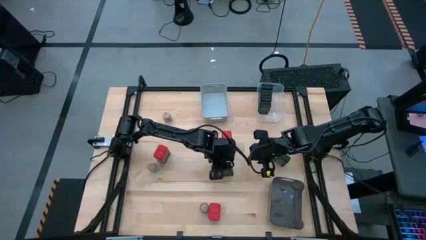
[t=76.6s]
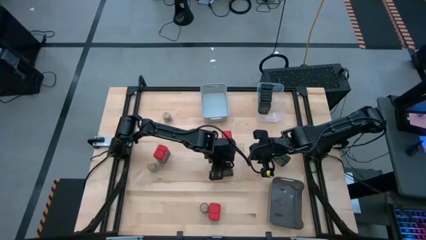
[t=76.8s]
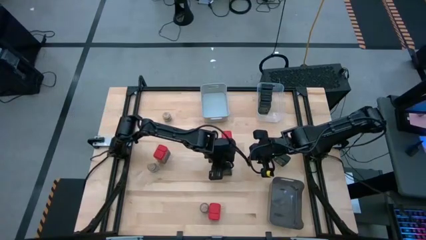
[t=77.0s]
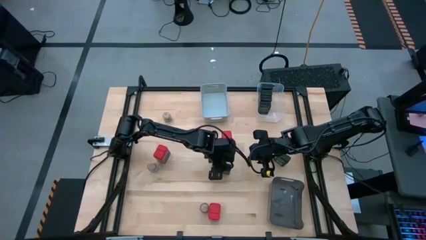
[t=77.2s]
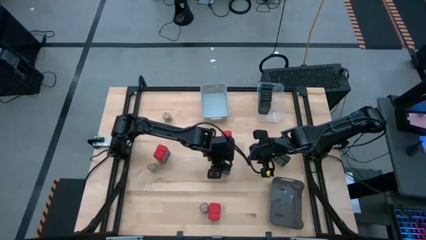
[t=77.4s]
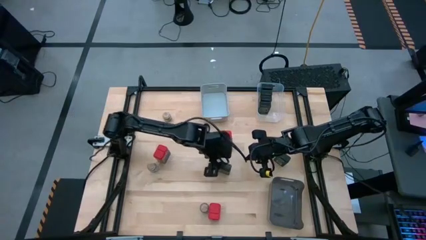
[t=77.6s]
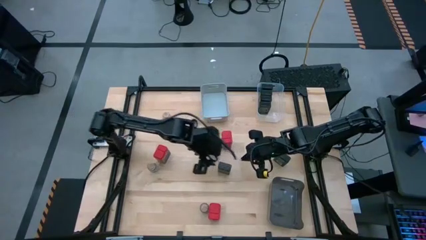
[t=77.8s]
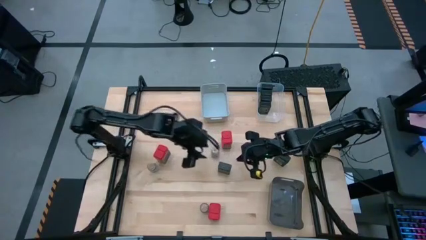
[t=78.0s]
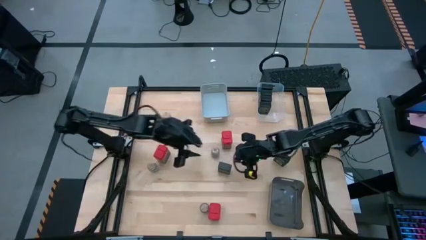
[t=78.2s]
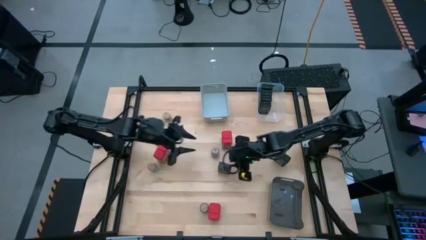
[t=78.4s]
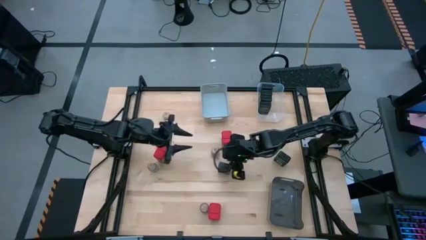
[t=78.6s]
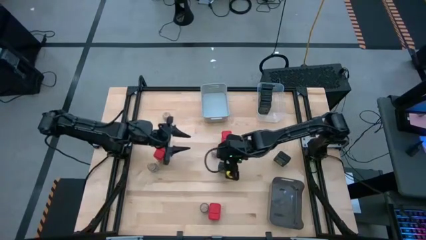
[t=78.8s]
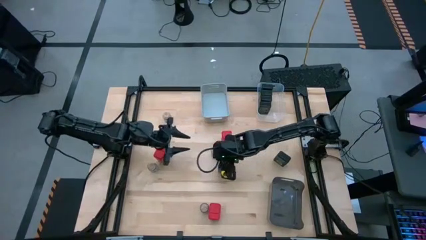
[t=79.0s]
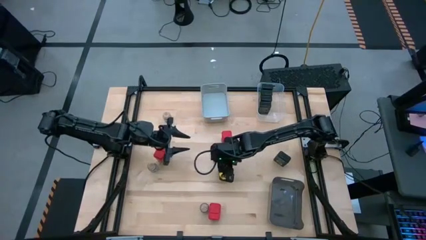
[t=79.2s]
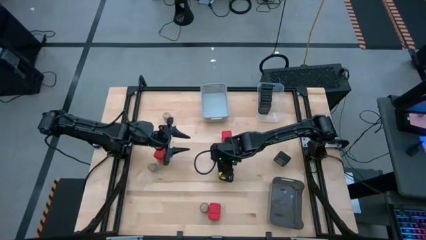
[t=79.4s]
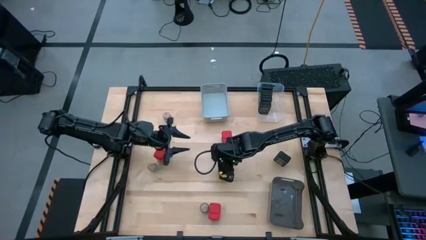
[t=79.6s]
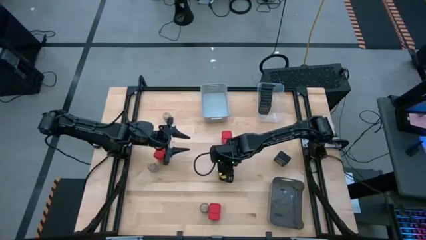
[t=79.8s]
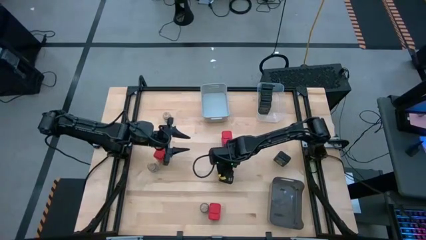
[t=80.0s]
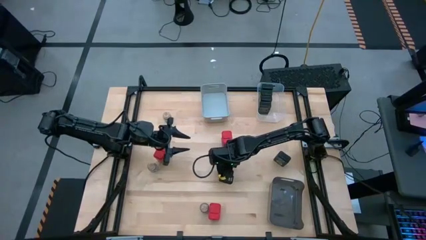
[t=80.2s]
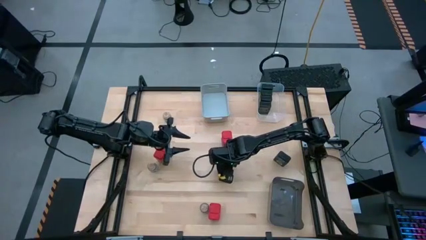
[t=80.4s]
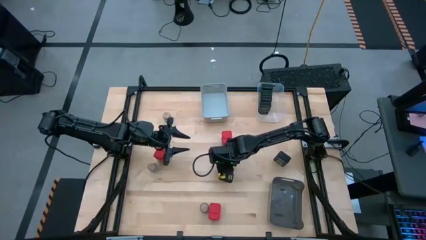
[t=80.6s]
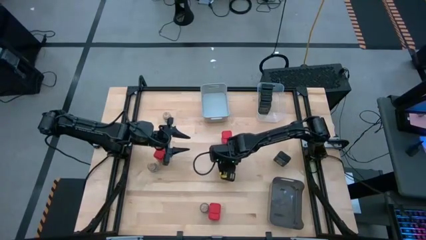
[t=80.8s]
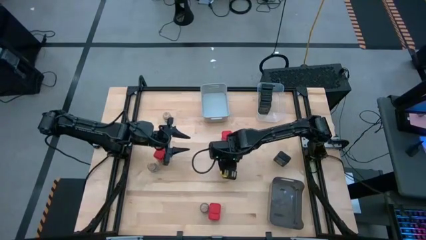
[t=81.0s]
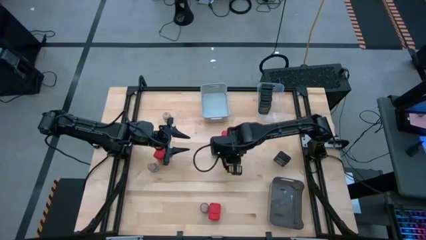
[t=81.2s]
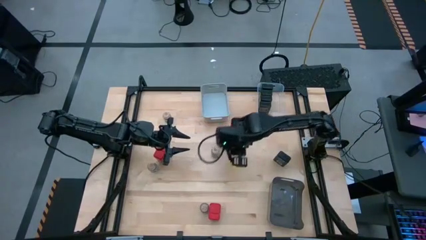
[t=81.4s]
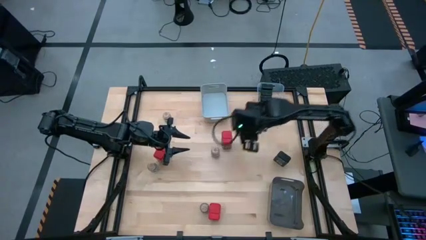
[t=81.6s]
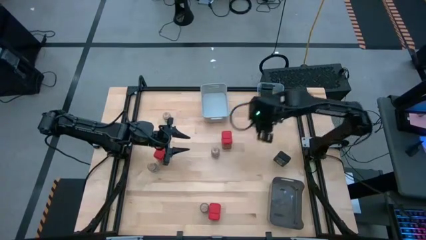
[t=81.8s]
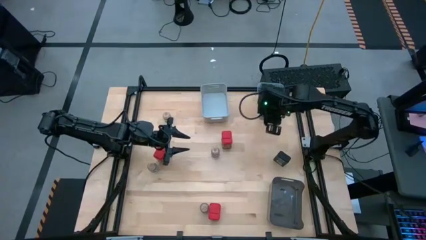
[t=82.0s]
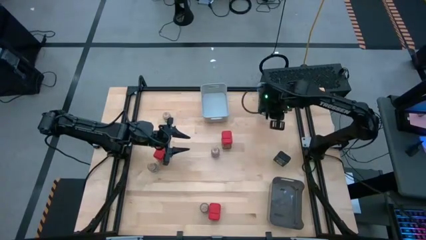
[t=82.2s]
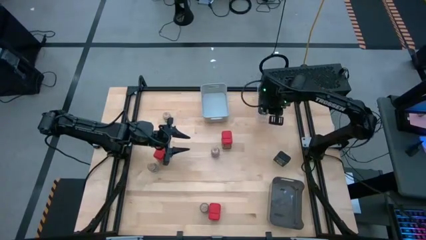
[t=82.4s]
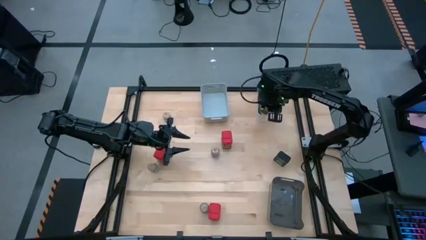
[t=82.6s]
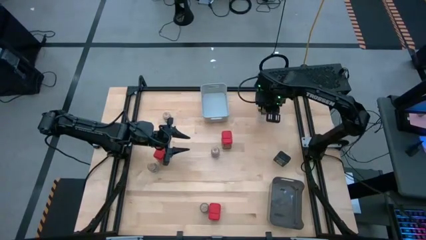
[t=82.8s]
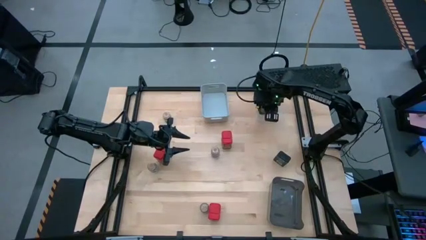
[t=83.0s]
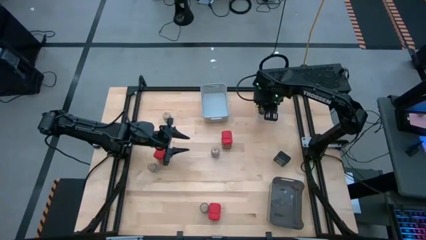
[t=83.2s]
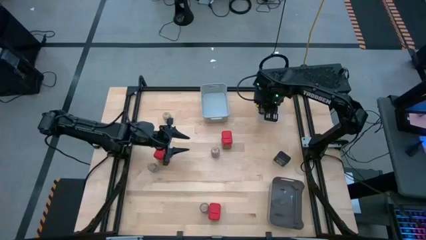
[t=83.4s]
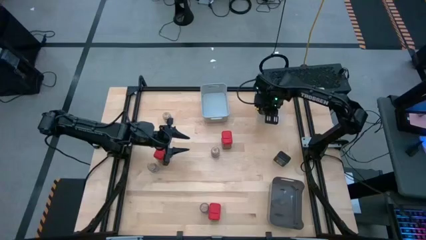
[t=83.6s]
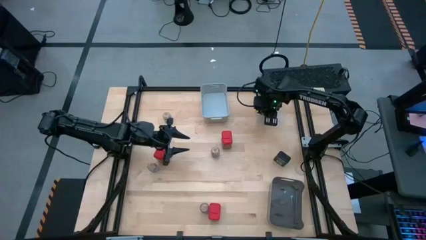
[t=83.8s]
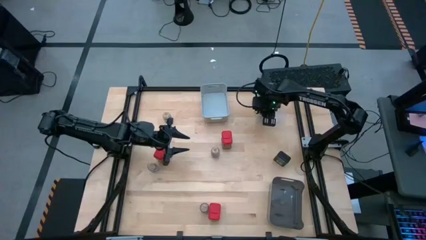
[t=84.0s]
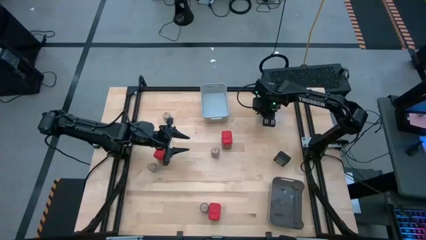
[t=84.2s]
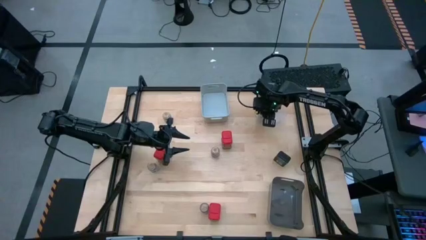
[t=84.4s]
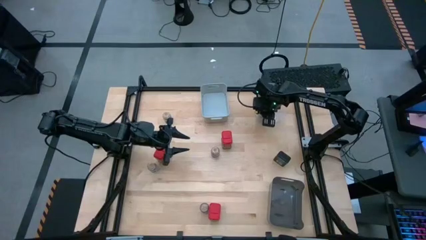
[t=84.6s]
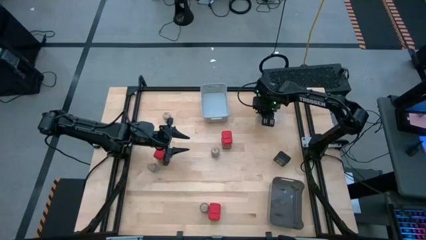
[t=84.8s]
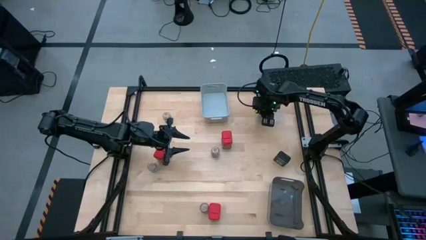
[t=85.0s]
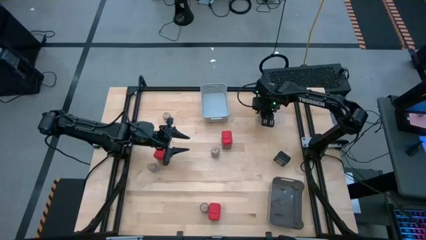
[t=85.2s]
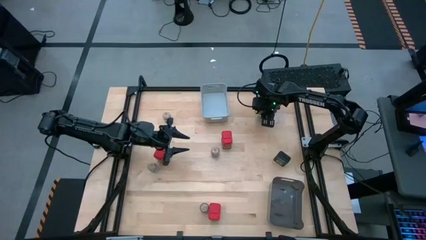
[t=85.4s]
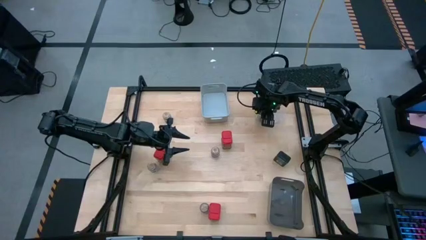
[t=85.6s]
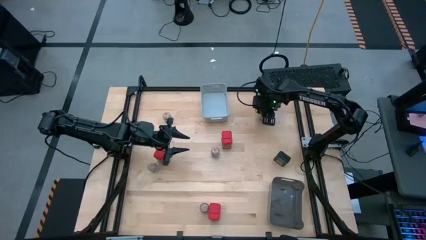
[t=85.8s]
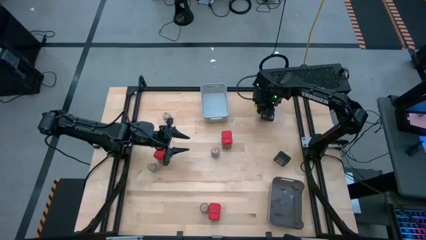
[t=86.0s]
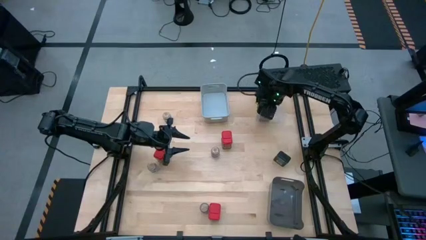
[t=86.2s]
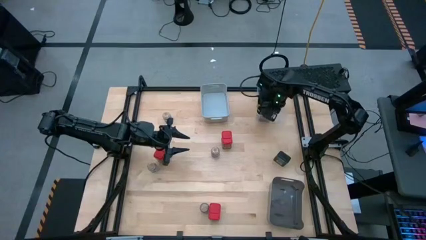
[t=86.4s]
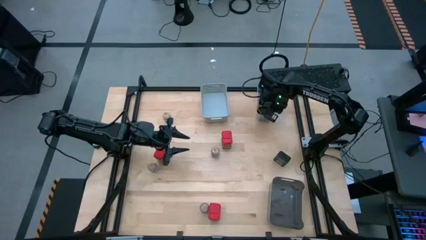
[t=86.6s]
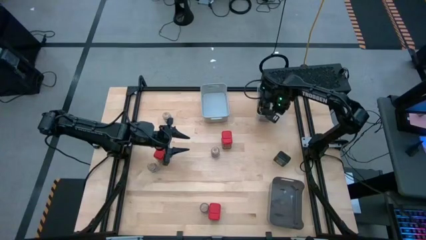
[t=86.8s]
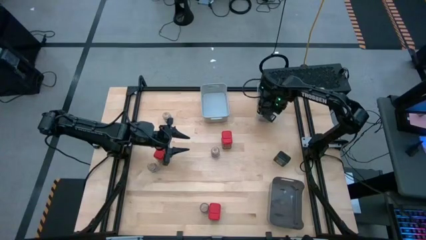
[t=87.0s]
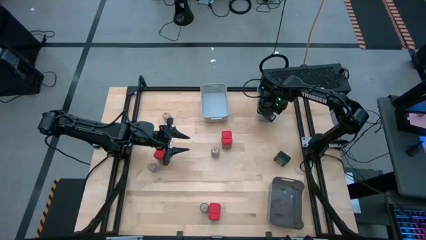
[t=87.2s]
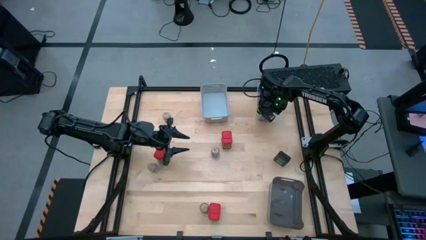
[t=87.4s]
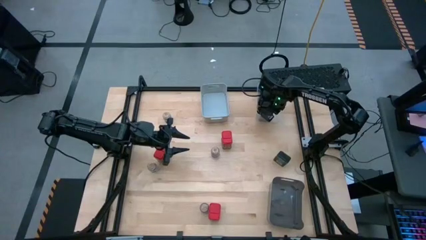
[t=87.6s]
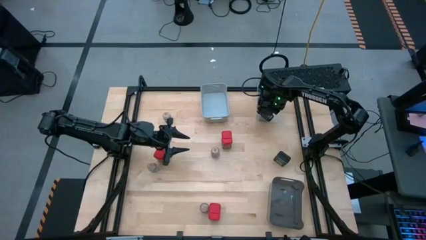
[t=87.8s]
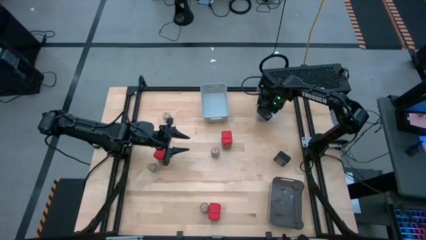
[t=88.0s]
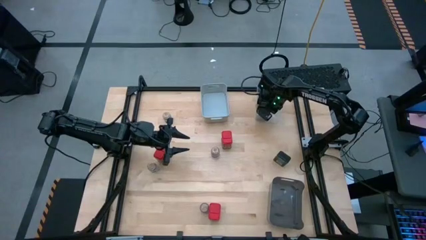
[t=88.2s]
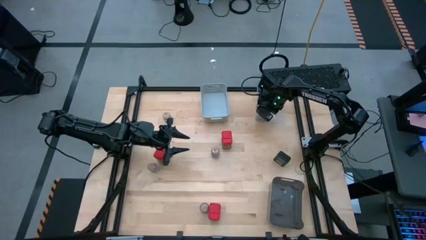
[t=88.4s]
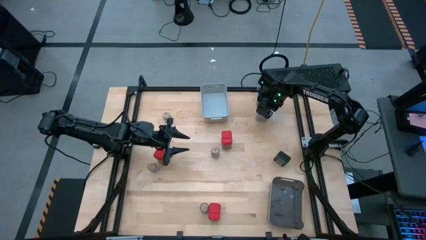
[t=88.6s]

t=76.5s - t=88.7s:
Task: Sort spices by type
Put the black seasoning can into the transparent bin

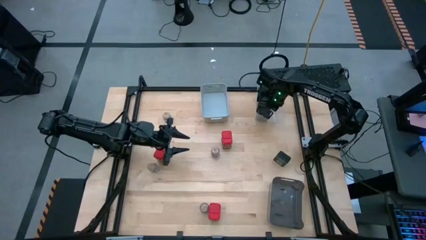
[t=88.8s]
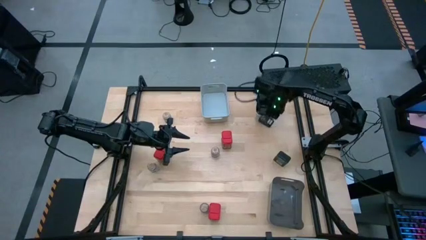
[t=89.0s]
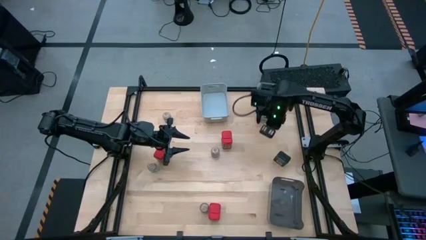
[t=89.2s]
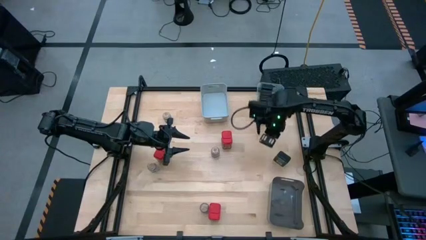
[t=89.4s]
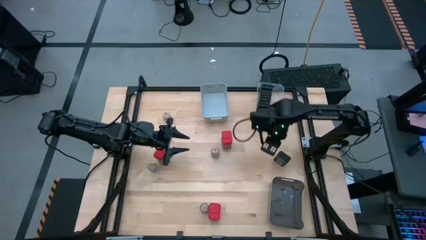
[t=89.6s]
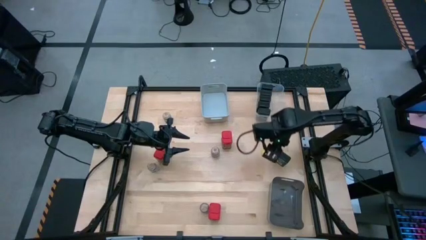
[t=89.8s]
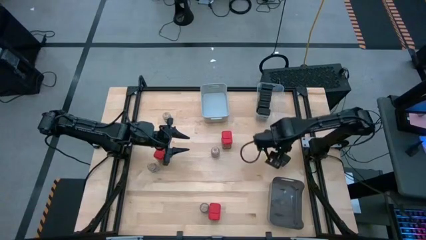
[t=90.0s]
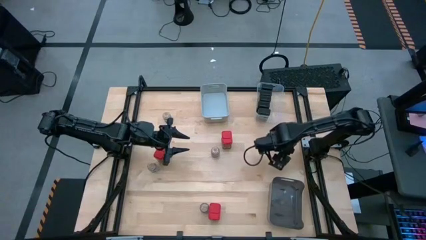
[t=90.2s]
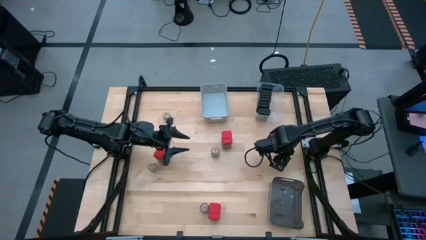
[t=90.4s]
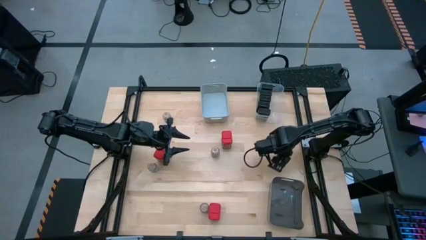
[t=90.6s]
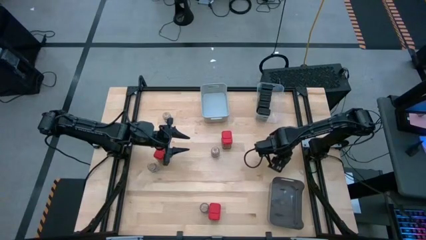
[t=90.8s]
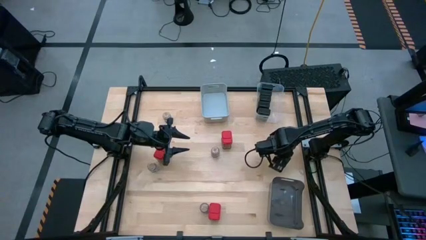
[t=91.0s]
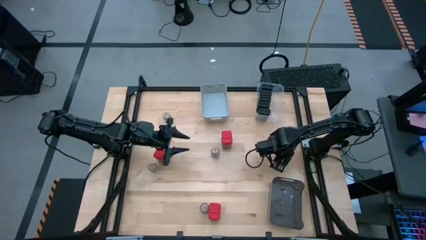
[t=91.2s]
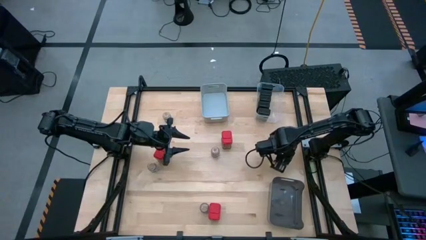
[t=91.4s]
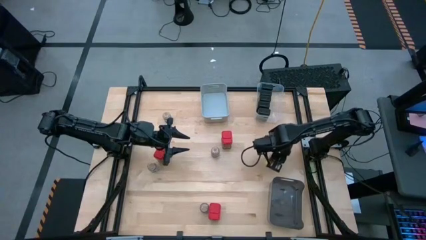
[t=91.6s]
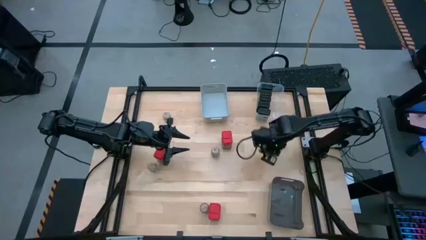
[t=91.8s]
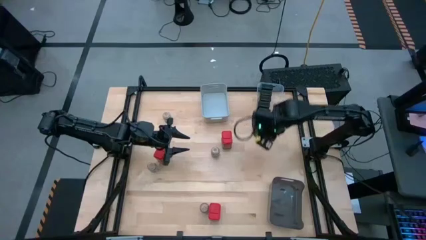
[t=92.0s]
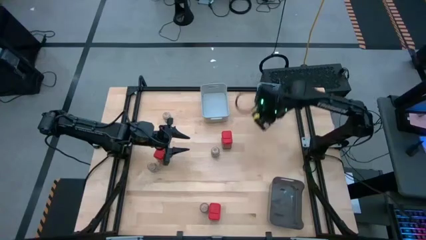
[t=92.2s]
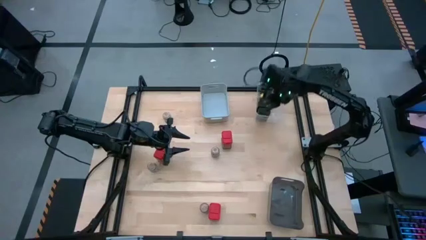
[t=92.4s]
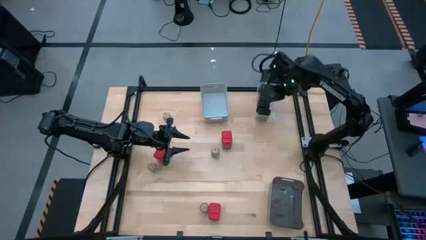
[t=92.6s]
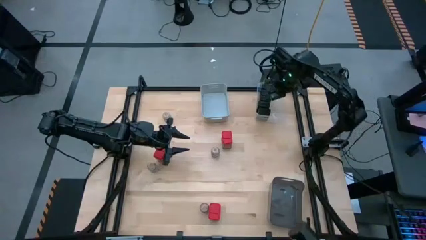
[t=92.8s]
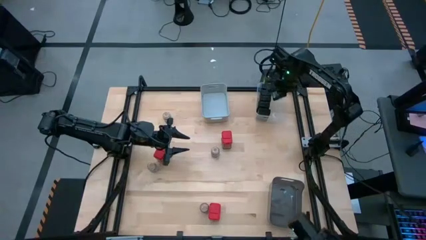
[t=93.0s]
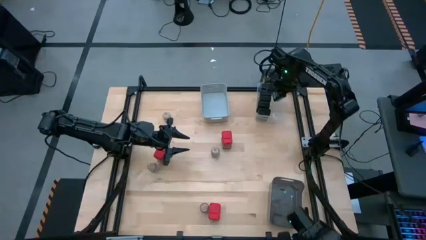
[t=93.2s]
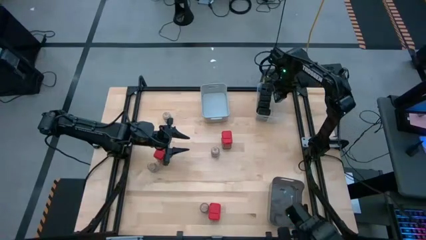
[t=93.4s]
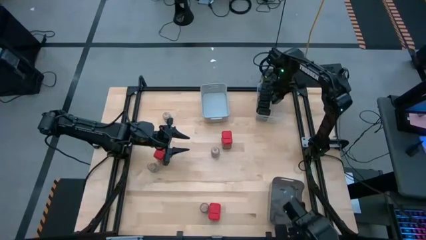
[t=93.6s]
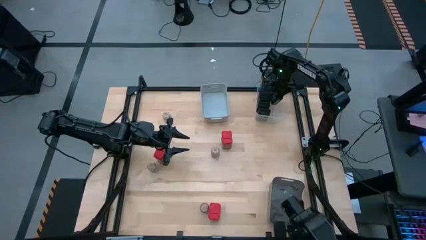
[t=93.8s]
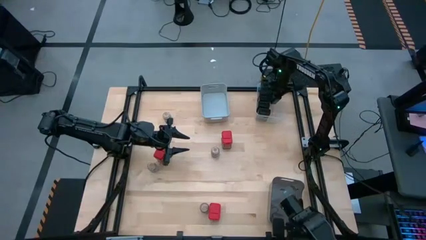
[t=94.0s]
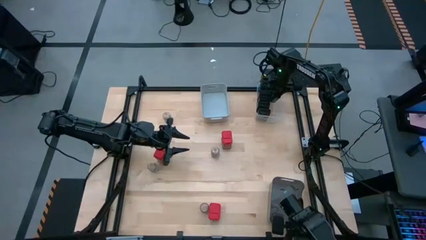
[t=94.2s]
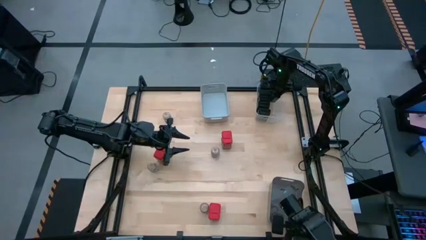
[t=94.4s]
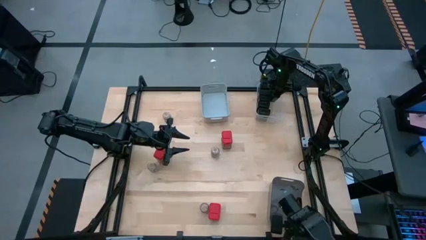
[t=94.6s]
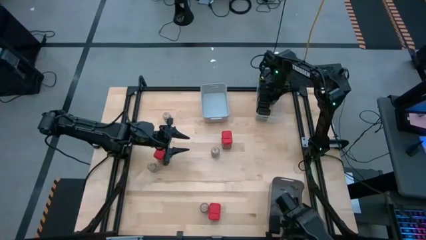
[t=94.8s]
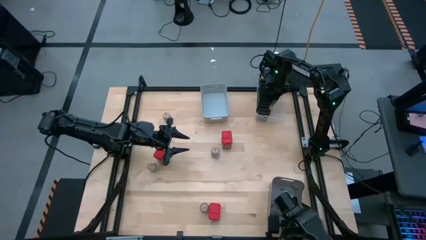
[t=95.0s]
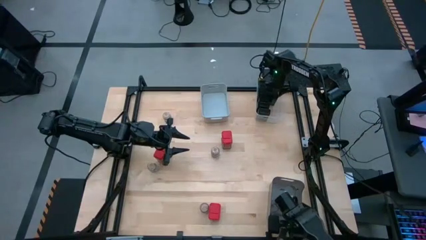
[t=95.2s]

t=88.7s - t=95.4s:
Put the black seasoning can into the transparent bin
